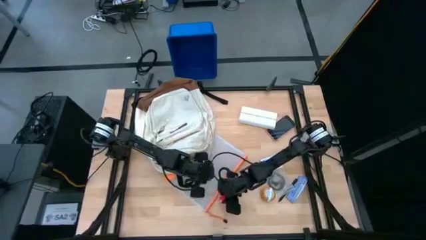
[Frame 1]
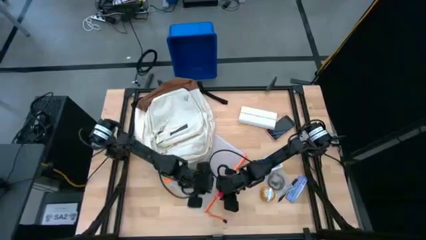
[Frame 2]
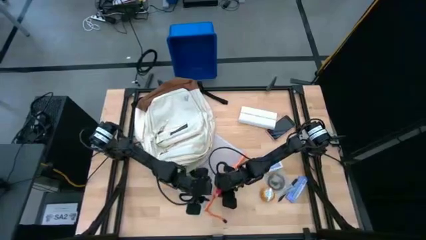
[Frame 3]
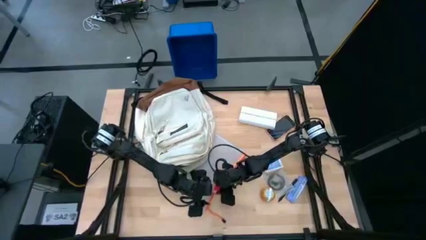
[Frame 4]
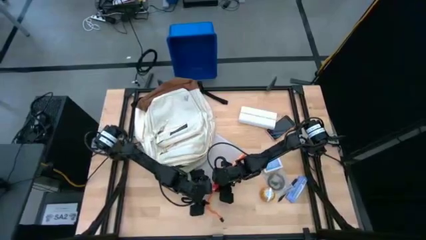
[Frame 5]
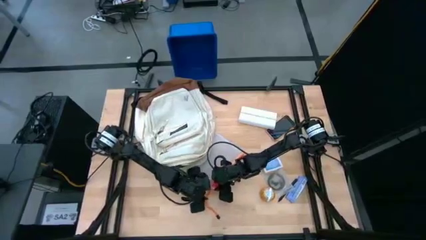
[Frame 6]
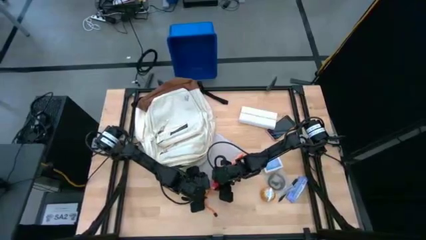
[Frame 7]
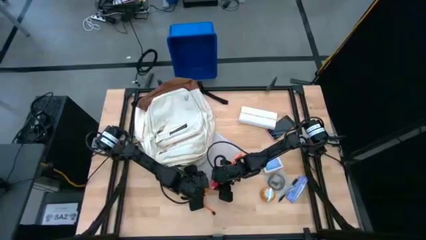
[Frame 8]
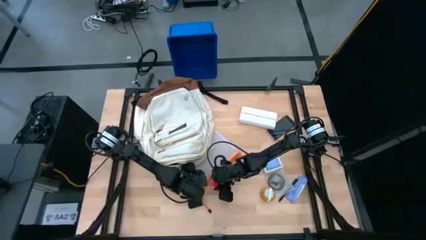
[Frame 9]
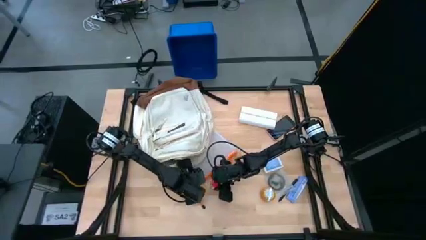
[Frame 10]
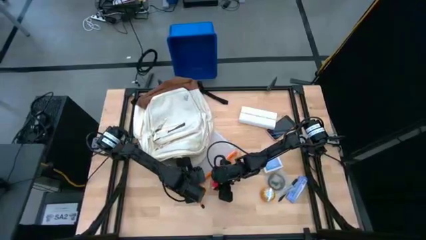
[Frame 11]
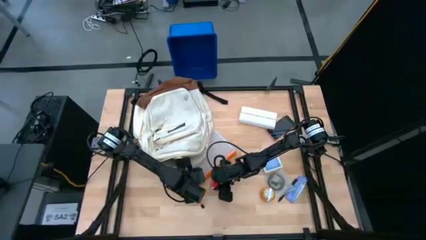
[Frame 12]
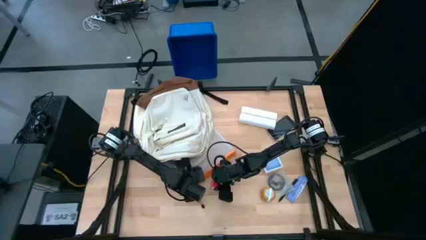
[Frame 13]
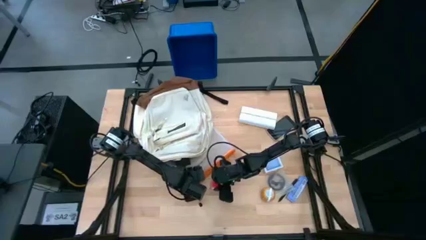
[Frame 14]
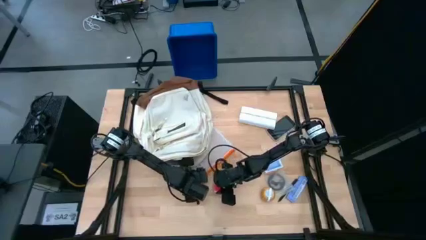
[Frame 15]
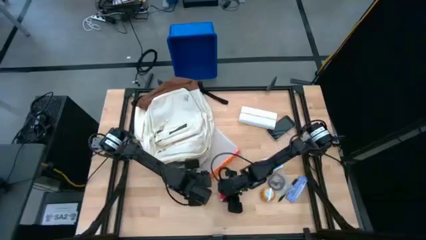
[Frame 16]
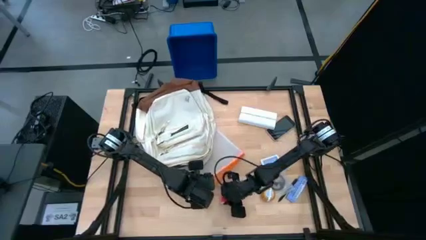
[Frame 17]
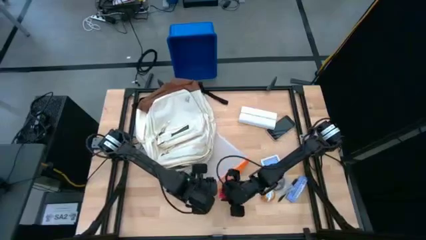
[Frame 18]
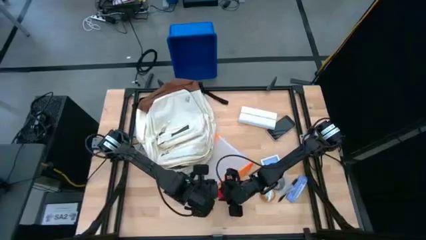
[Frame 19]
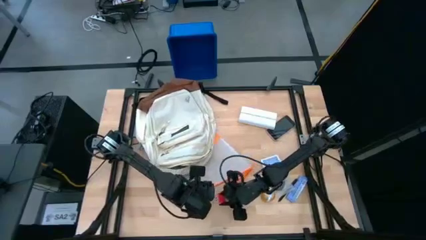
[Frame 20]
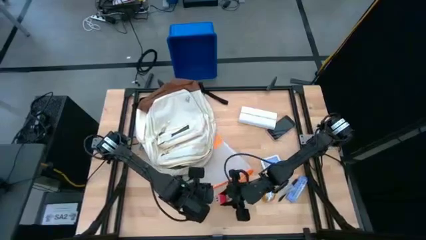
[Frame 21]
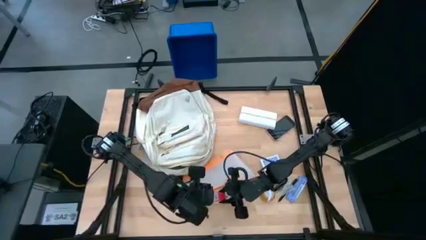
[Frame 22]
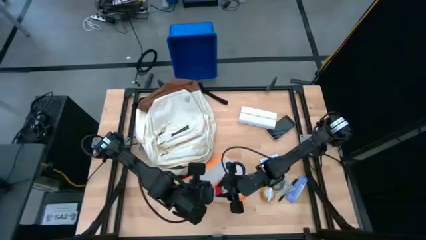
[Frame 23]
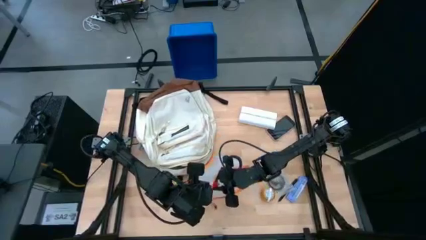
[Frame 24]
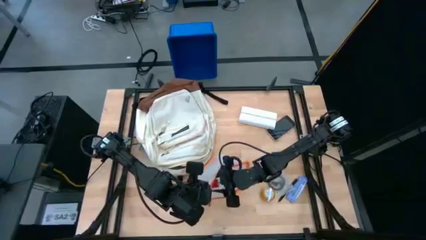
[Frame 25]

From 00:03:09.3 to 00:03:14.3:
Task: Unpack backpack
Put the red charger adaptor into the zip bag

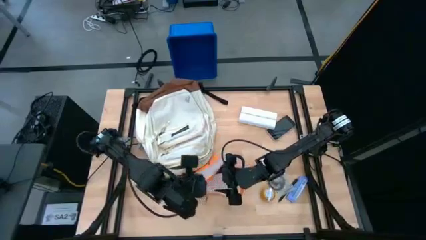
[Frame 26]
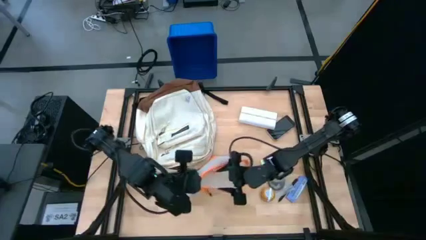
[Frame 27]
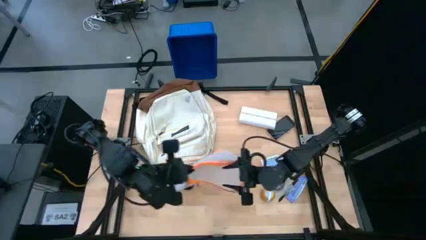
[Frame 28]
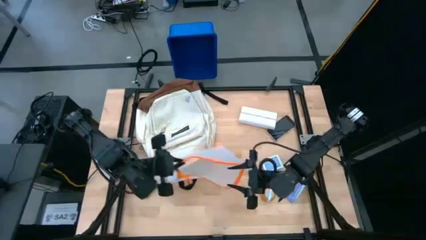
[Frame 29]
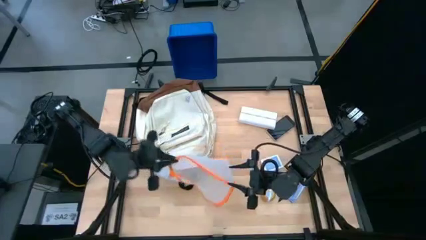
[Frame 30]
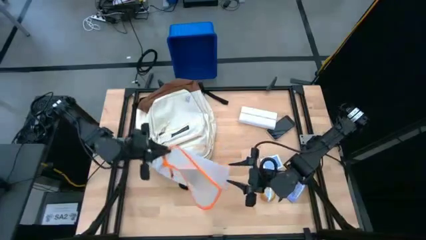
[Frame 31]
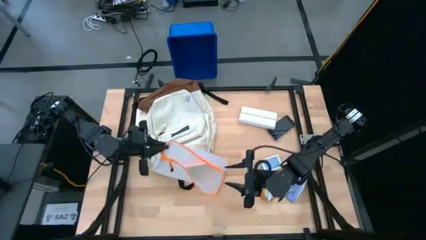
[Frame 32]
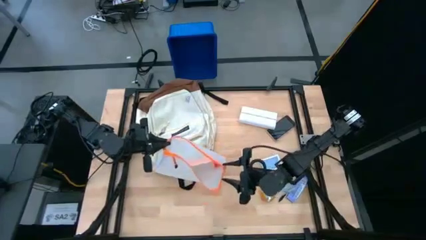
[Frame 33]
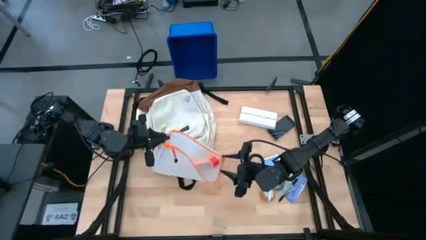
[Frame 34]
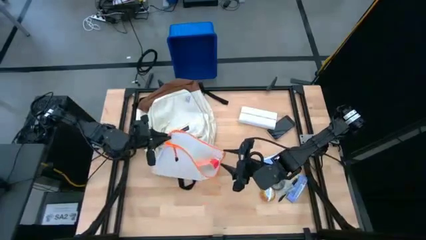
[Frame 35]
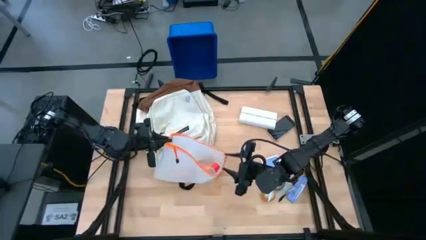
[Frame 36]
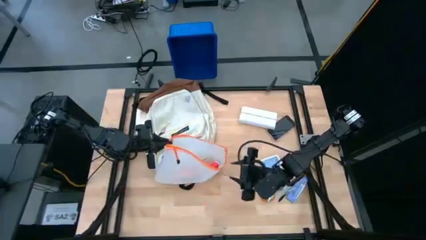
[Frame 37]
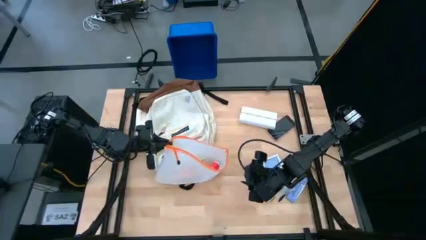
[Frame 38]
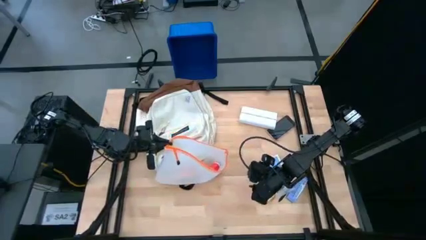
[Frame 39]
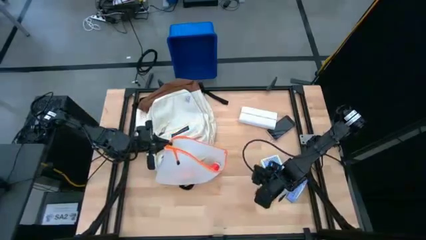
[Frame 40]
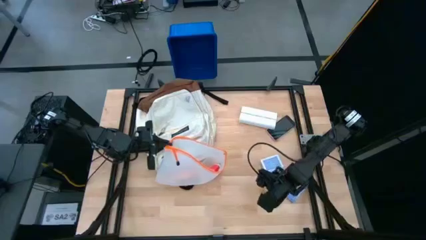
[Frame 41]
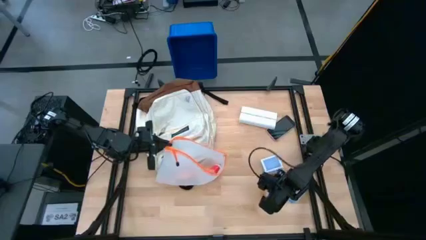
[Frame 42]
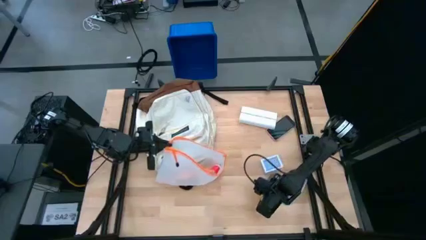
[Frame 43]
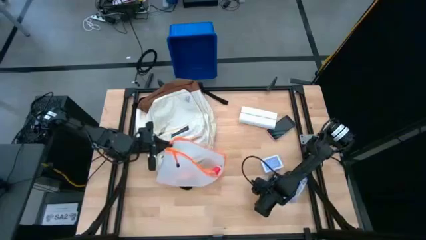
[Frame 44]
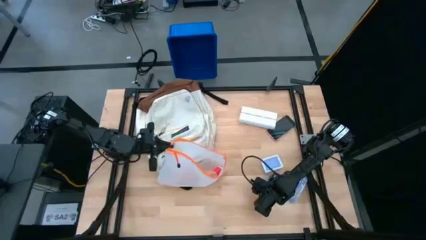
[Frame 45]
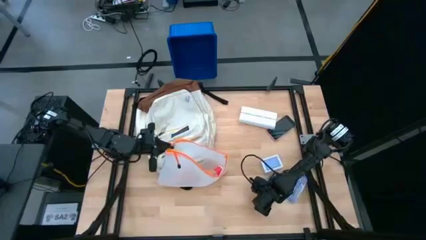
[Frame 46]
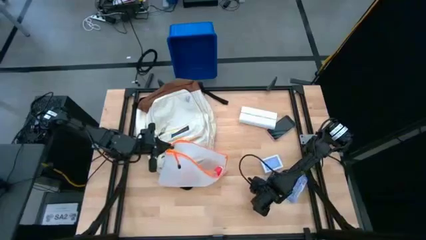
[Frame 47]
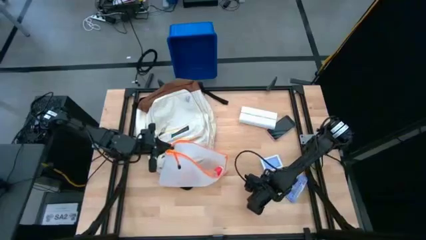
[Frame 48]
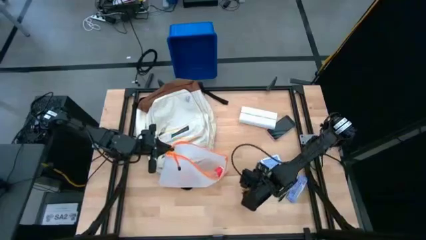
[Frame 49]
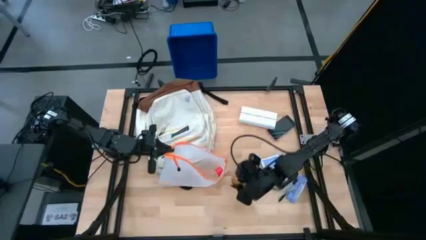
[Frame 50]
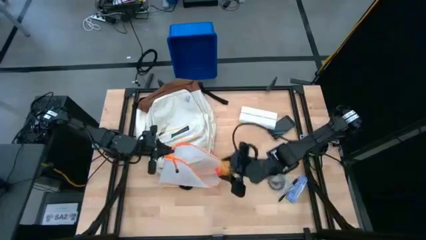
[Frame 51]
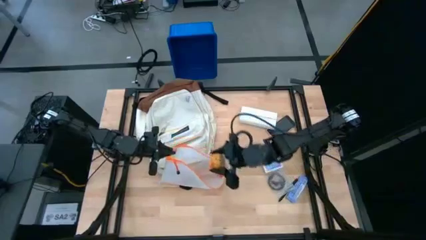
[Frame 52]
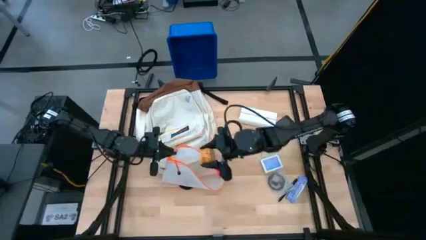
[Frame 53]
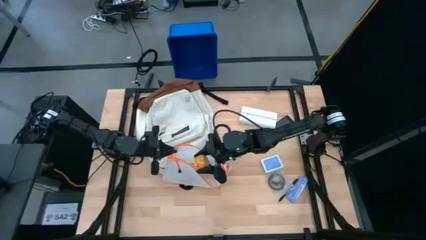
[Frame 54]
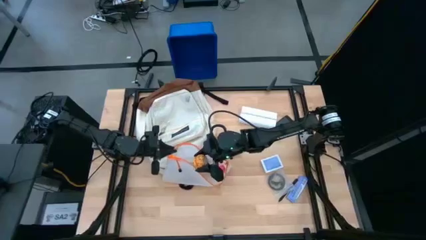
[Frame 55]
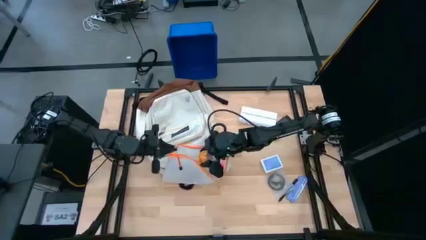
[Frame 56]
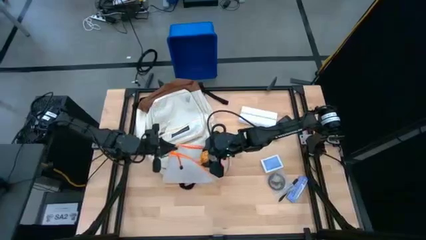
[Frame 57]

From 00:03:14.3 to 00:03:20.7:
Put the yellow scented candle into the zip bag

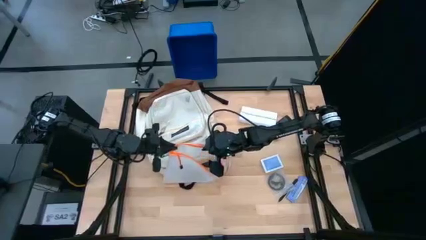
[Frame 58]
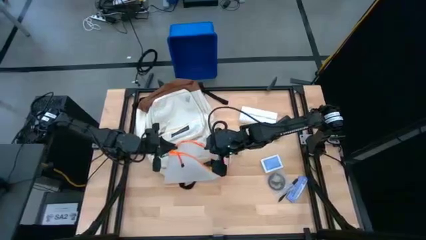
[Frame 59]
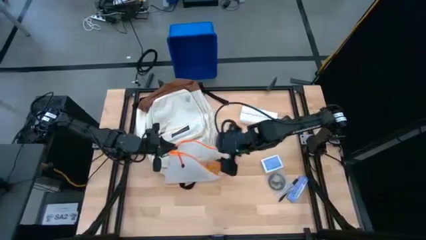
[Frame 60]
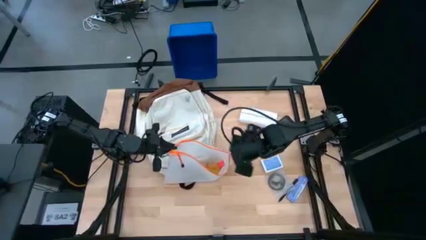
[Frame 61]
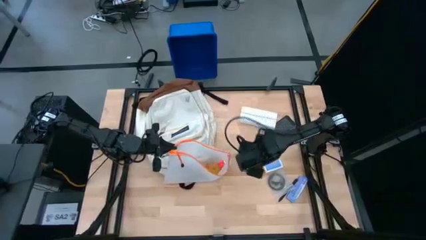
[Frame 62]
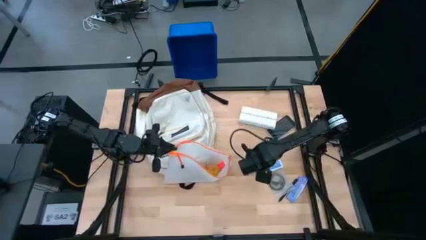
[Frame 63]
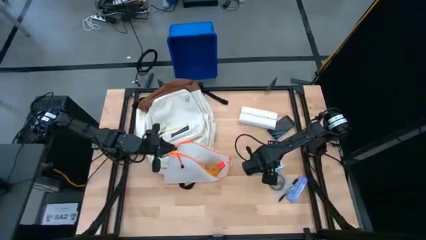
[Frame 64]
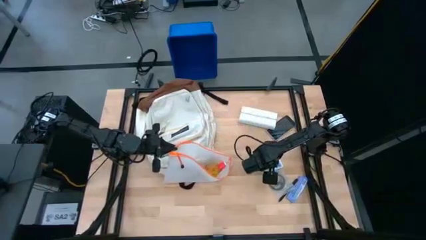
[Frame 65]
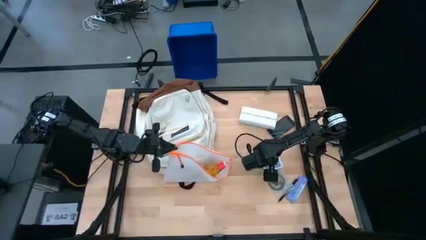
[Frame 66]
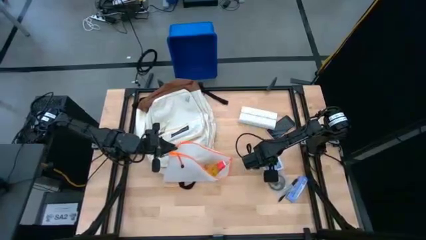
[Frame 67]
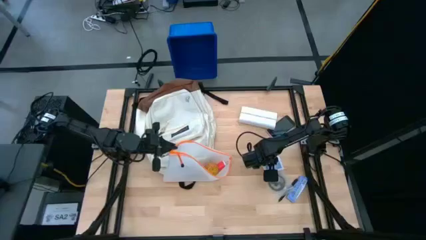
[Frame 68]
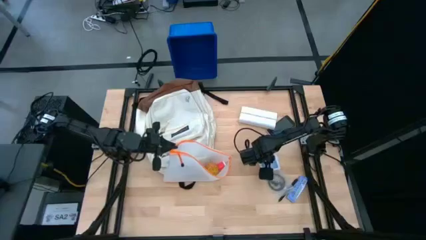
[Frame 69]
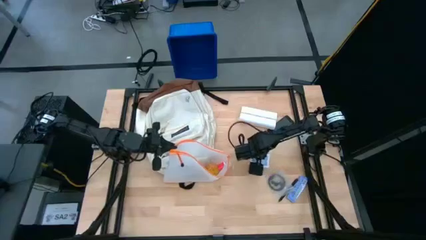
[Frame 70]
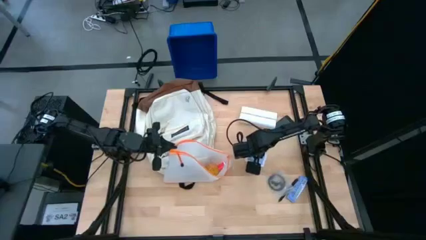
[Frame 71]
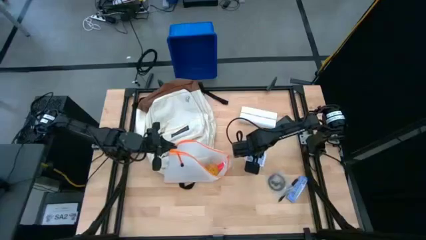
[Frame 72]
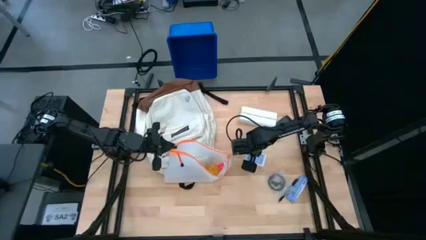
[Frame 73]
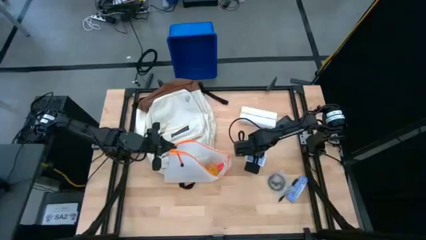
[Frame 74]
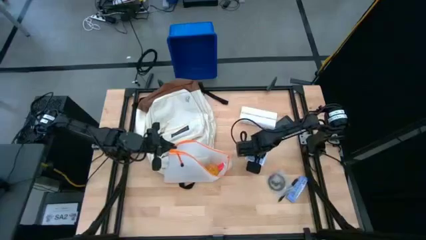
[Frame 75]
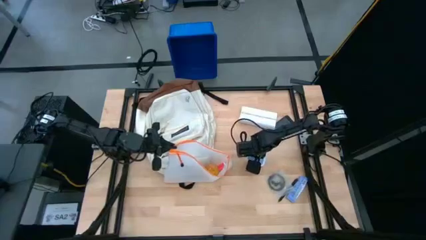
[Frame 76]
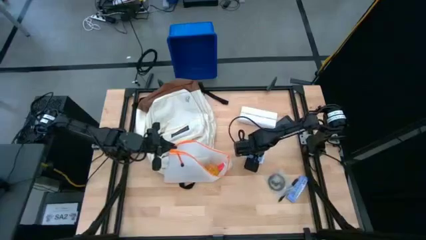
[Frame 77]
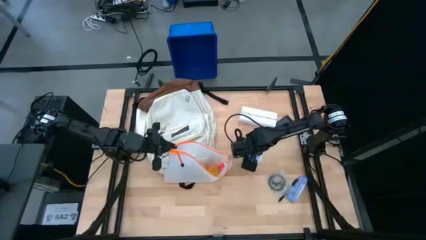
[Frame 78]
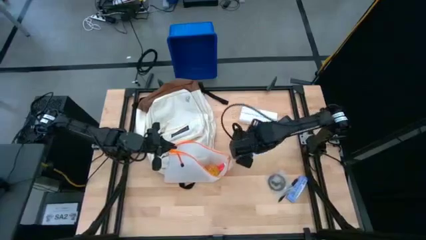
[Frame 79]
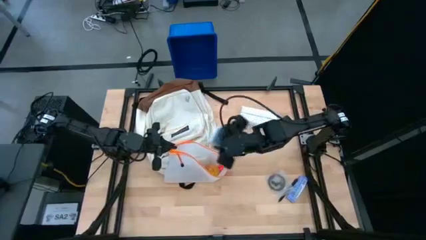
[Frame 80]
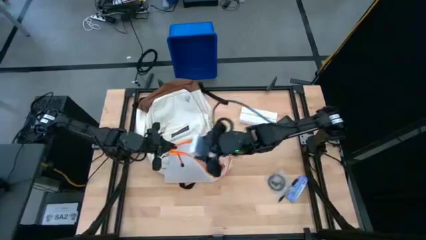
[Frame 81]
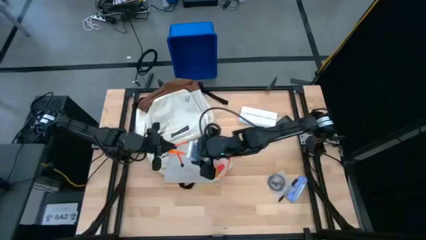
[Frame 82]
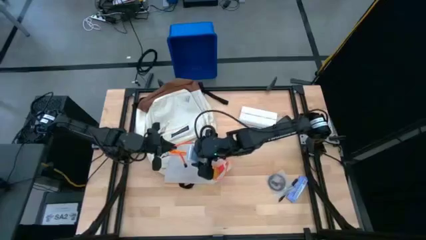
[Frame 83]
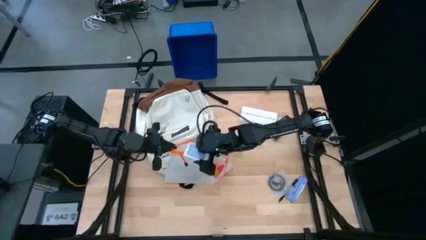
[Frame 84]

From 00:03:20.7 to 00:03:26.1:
Put the white playing card box into the zip bag
